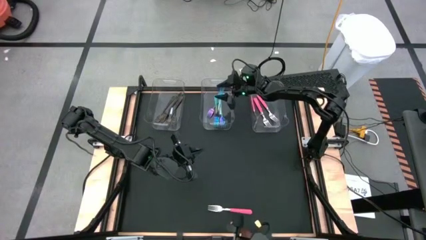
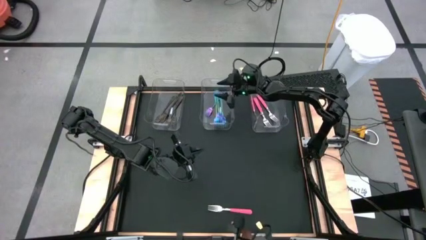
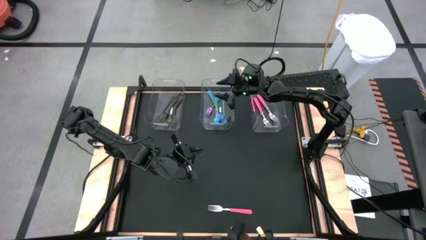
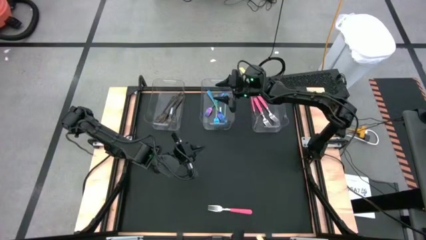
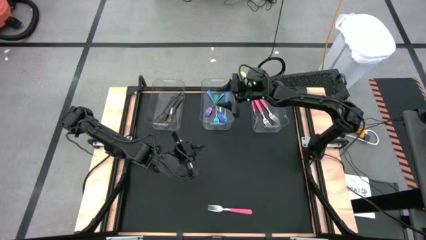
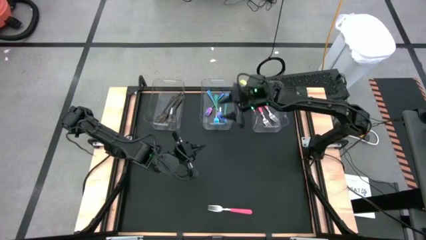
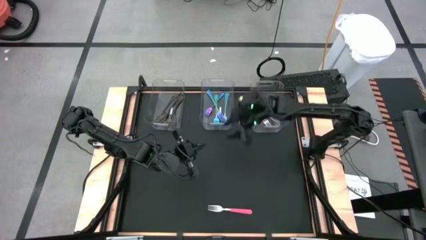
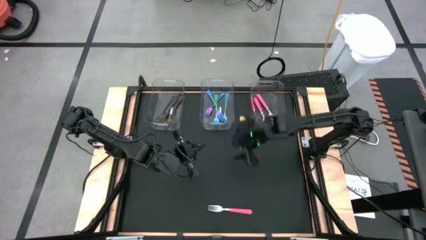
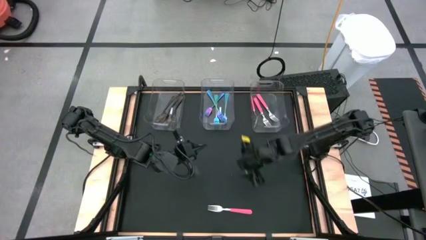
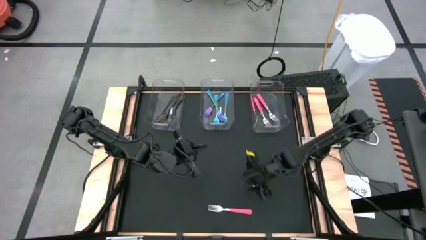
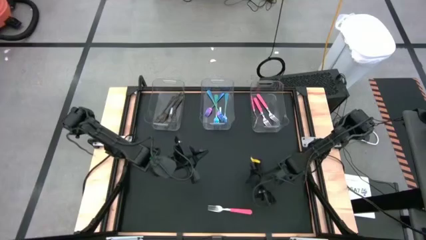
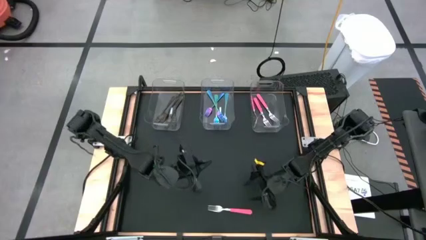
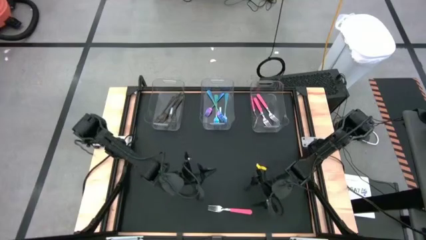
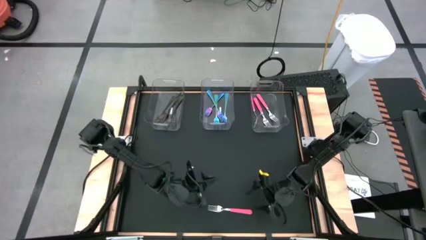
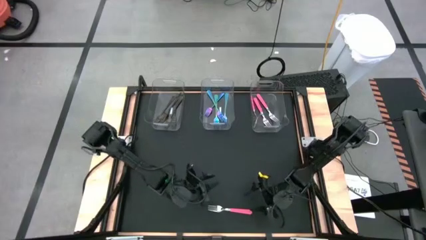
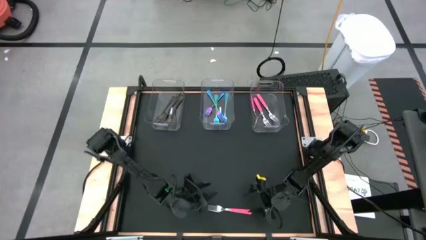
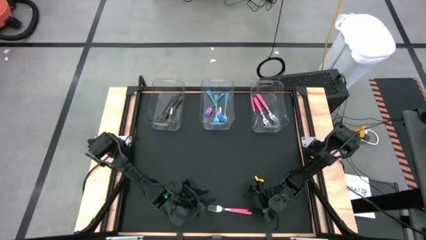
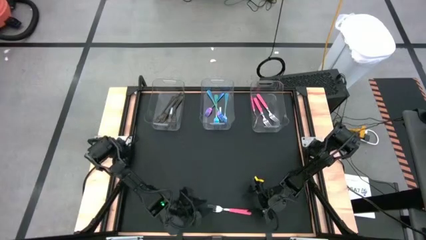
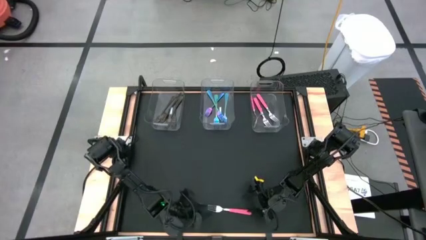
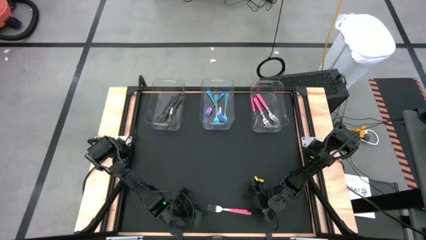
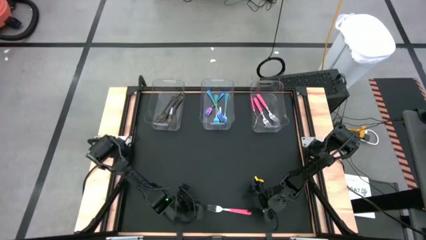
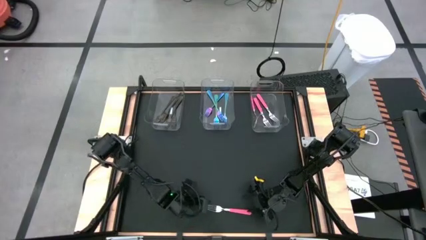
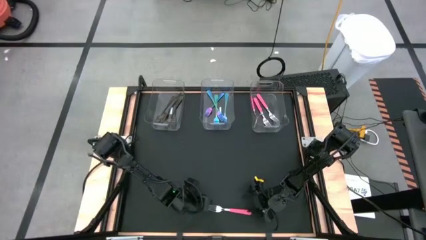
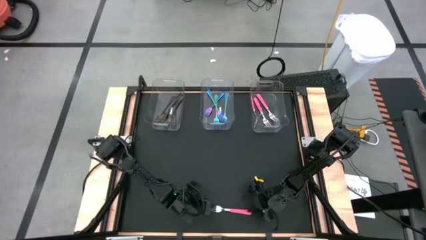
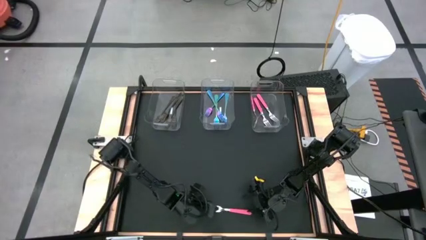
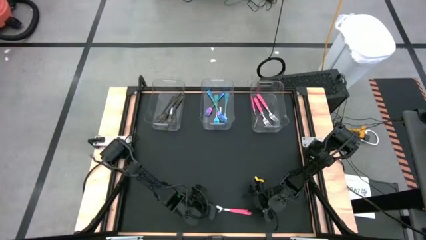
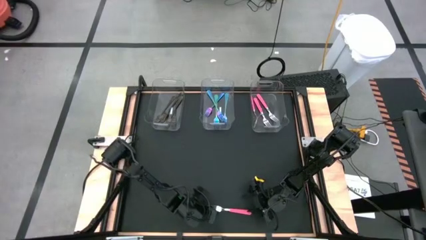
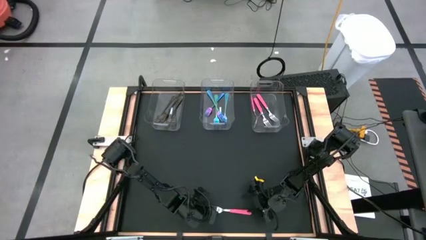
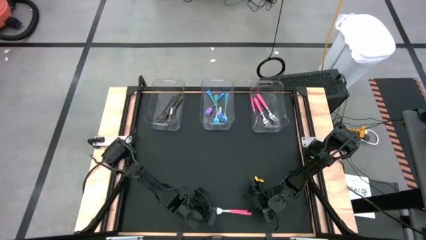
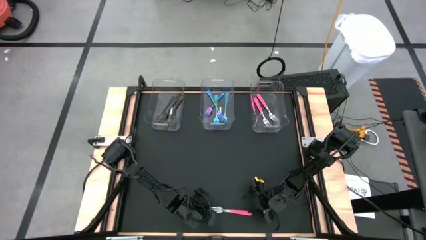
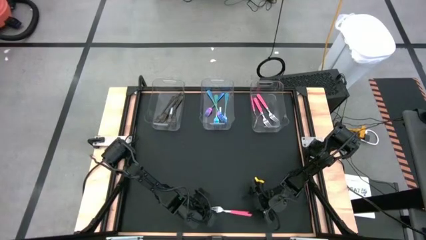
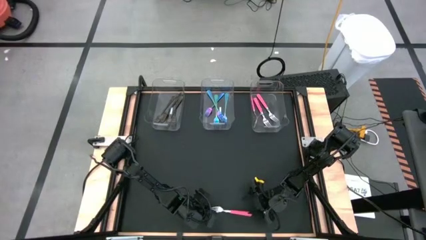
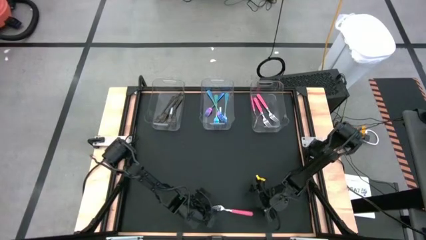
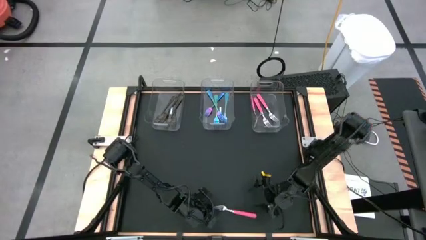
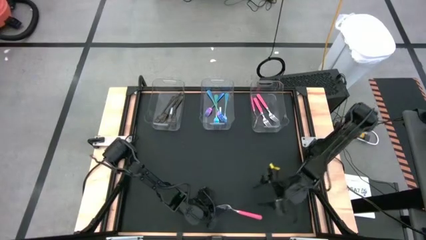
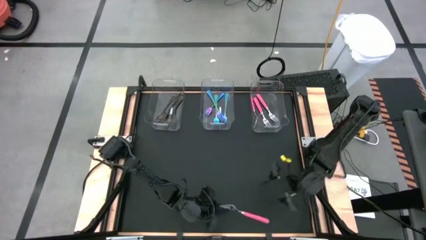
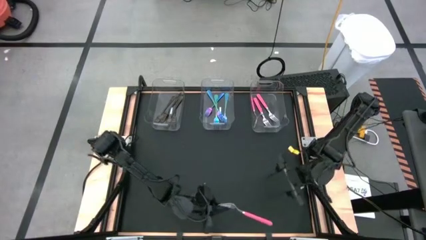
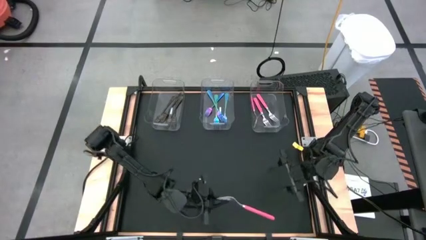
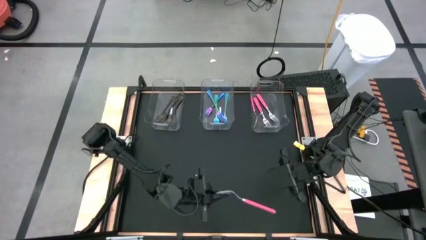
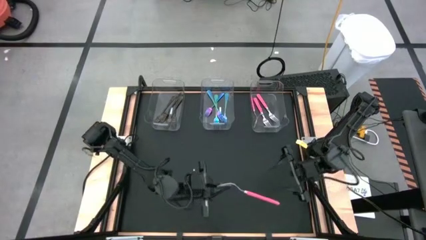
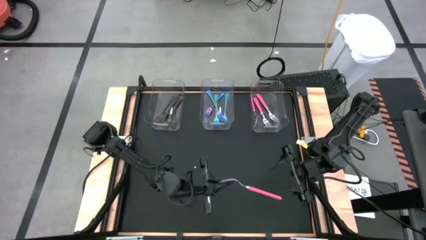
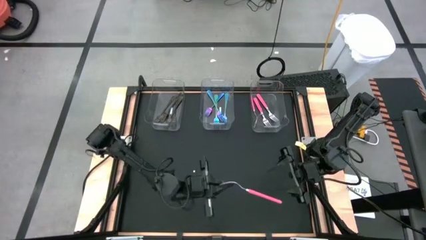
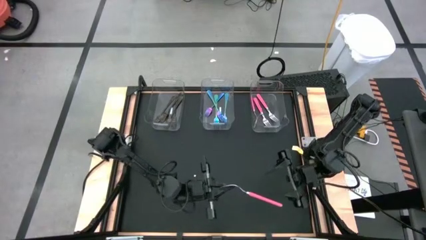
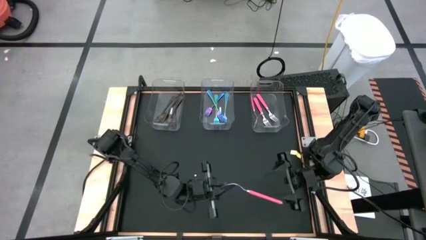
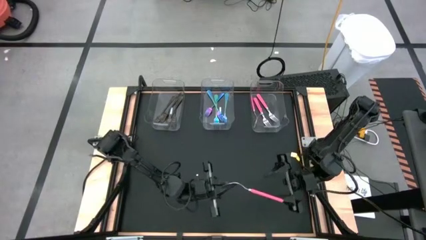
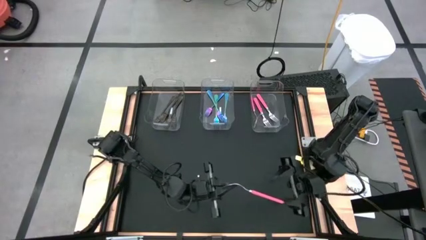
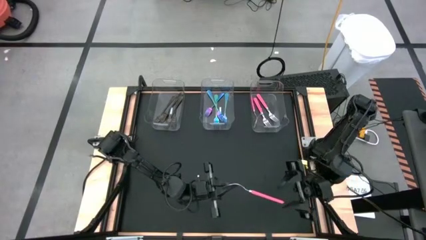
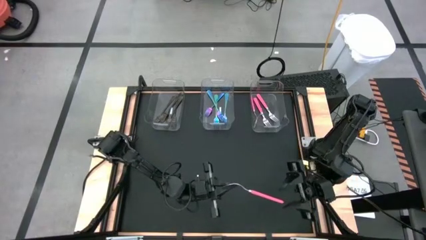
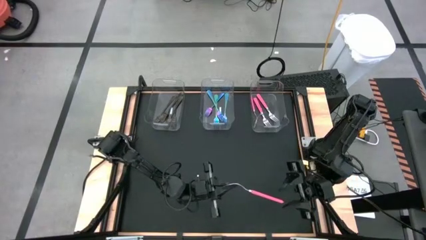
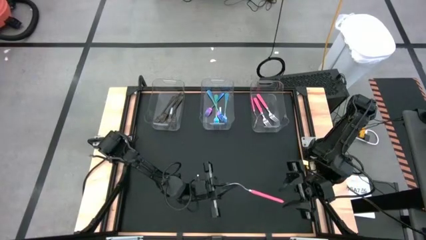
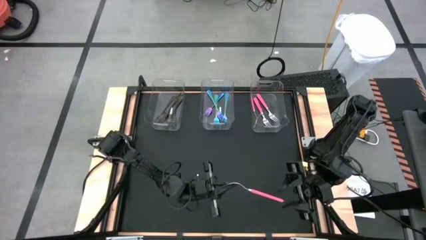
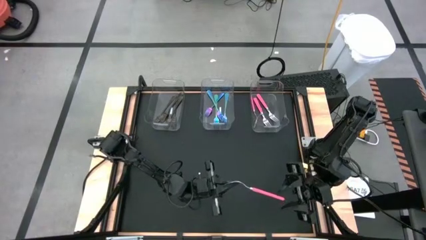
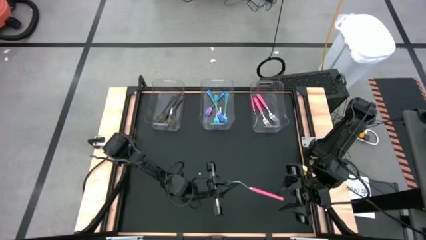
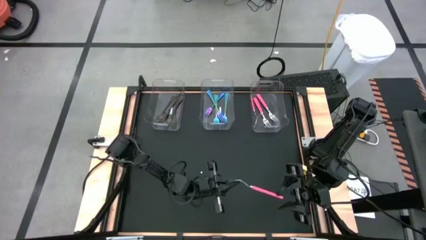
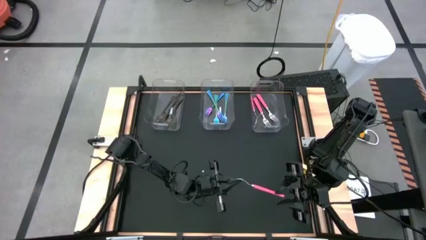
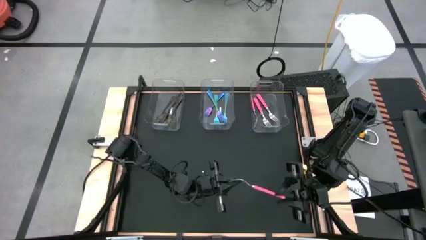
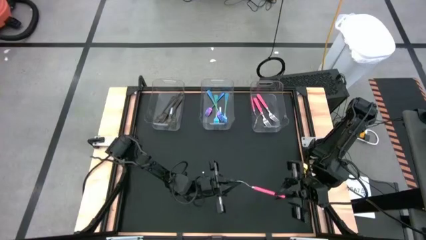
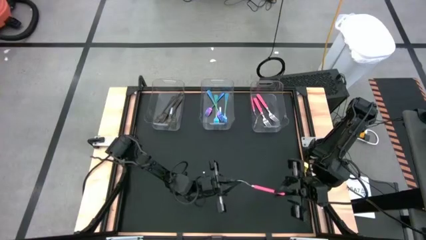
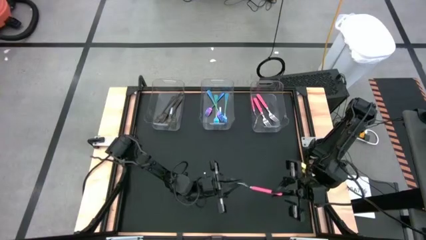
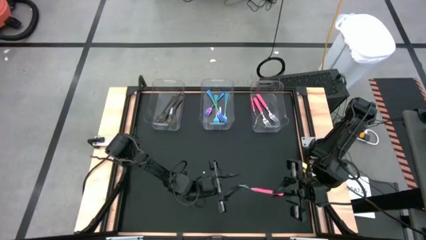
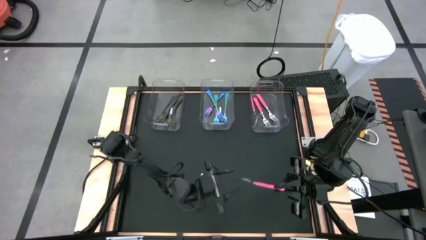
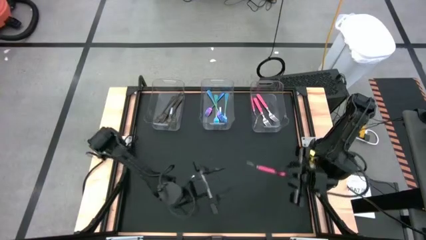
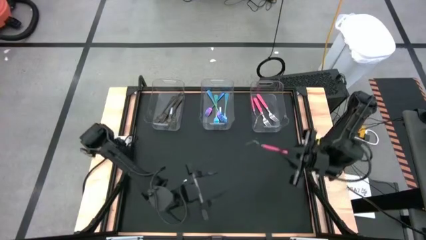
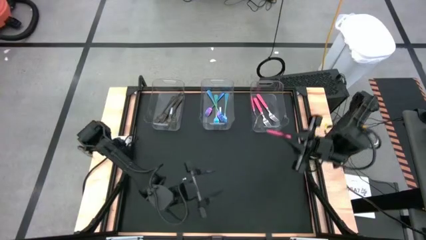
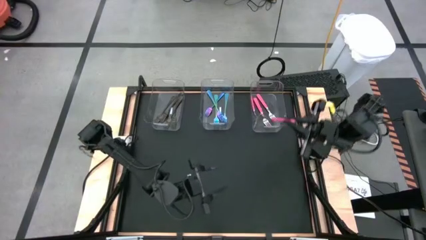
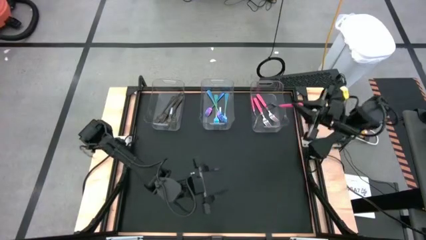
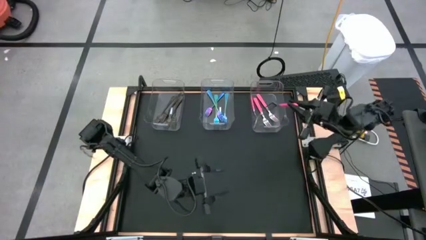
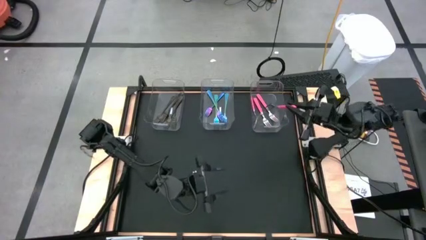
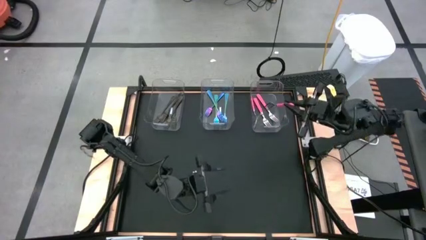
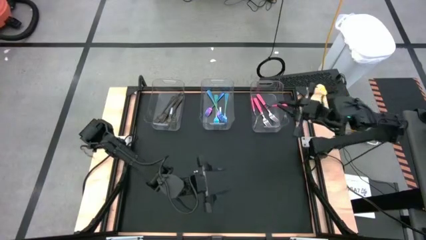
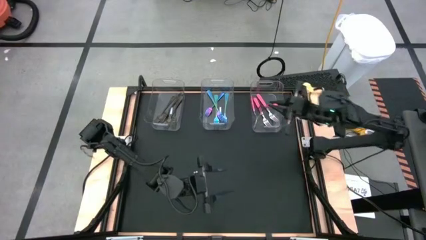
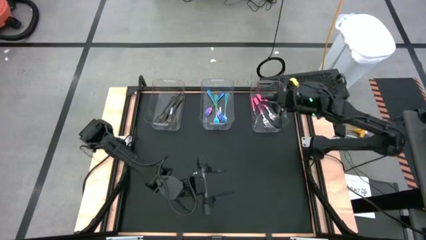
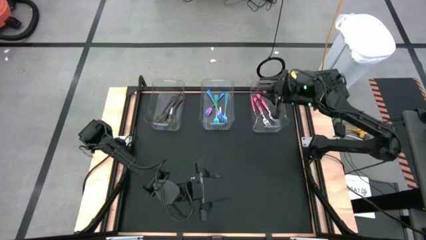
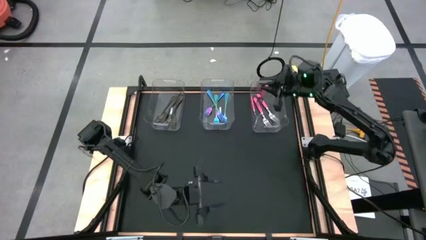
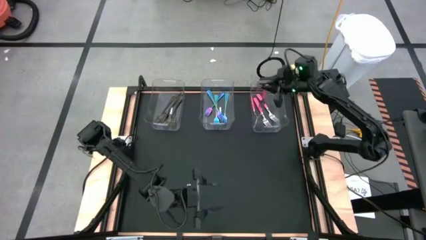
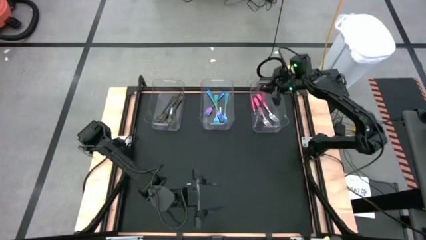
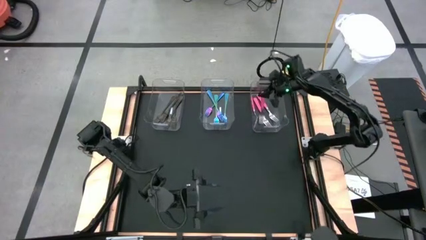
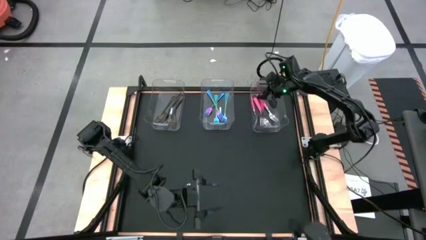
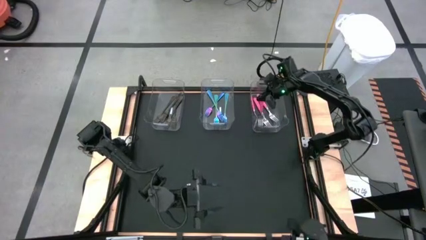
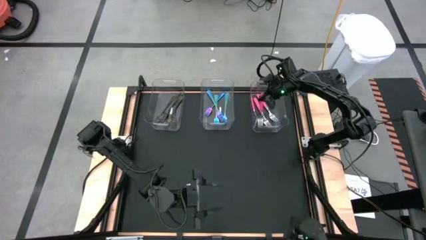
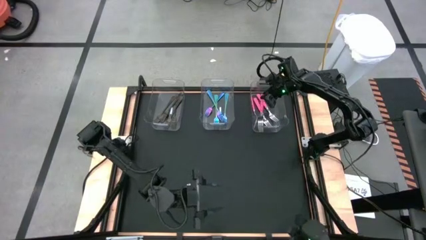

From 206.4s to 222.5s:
Task: Sort silverware by color (type)
Put the pink fork into the right transparent bin
